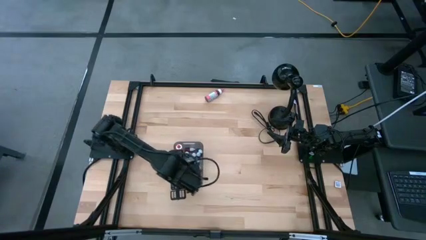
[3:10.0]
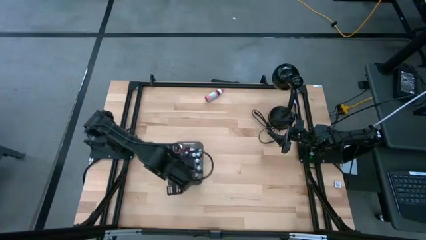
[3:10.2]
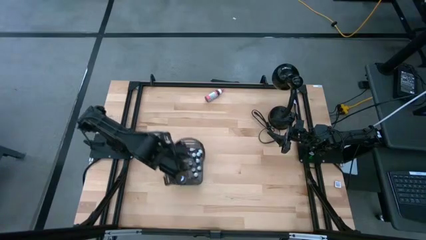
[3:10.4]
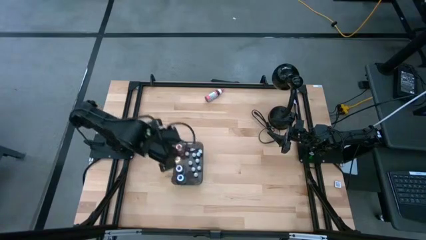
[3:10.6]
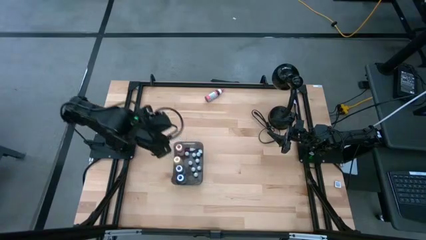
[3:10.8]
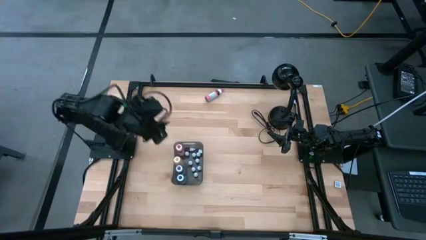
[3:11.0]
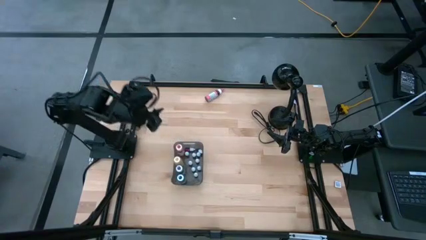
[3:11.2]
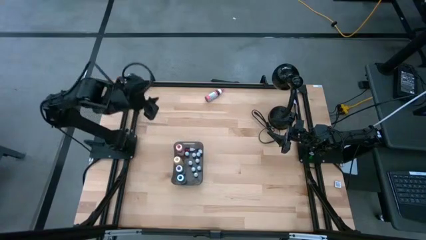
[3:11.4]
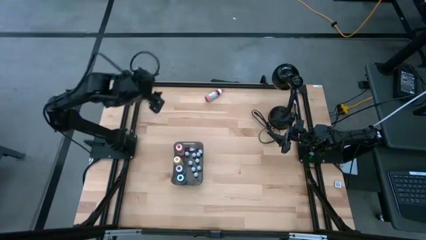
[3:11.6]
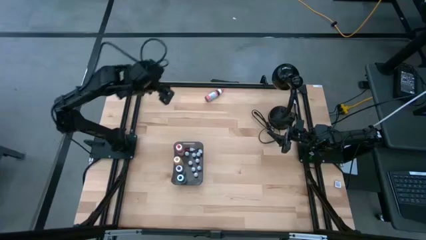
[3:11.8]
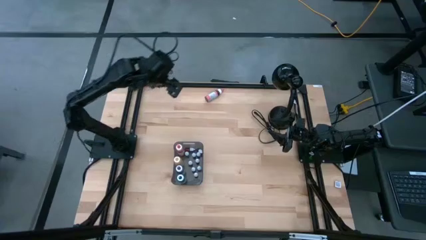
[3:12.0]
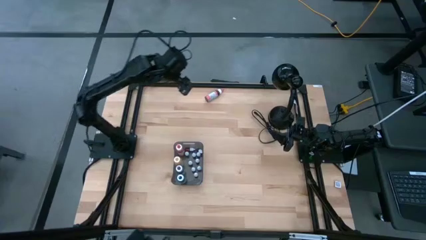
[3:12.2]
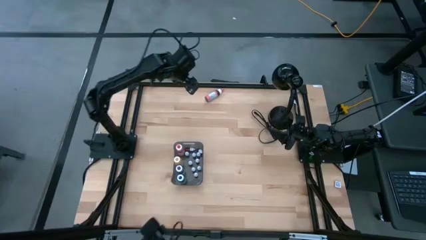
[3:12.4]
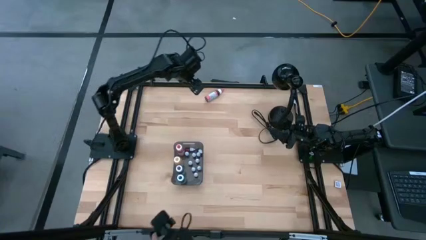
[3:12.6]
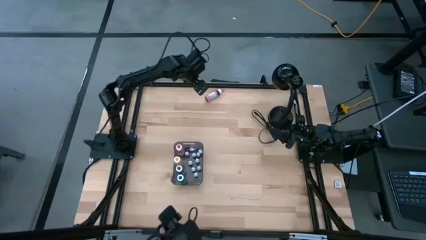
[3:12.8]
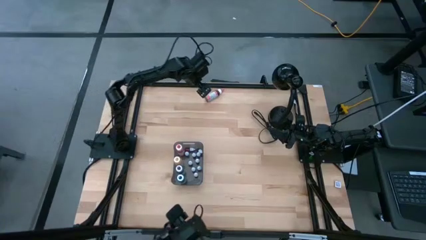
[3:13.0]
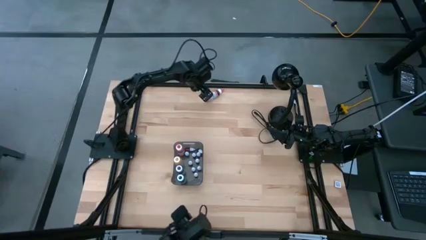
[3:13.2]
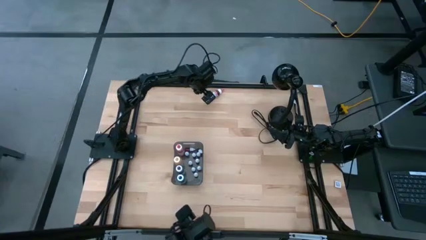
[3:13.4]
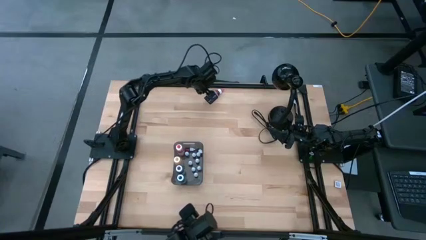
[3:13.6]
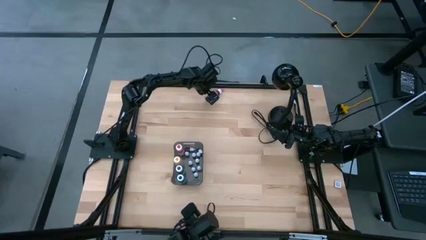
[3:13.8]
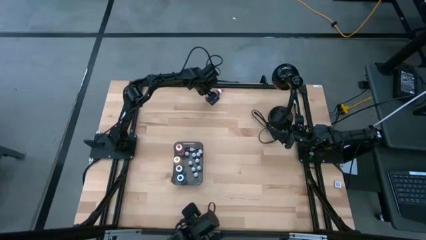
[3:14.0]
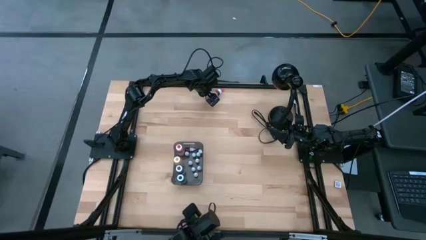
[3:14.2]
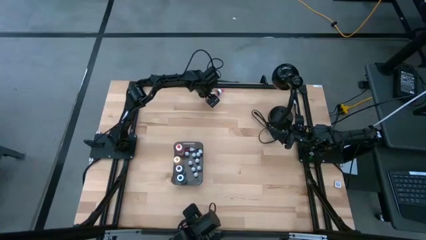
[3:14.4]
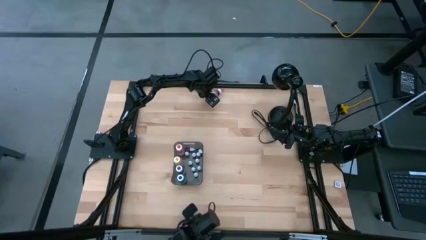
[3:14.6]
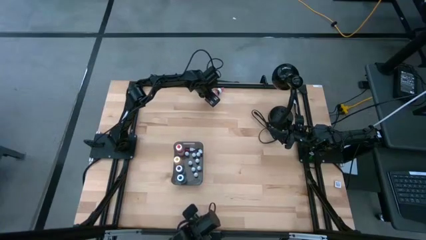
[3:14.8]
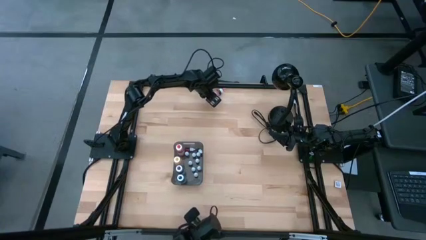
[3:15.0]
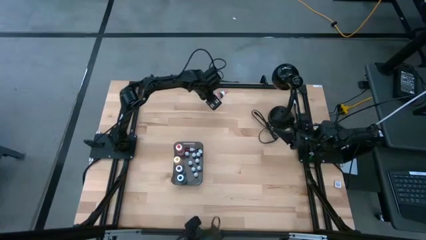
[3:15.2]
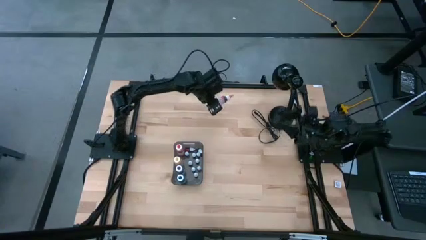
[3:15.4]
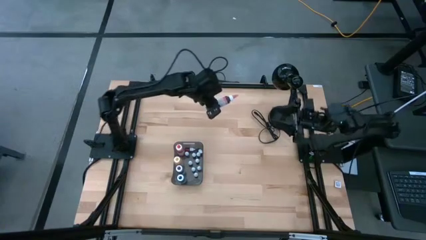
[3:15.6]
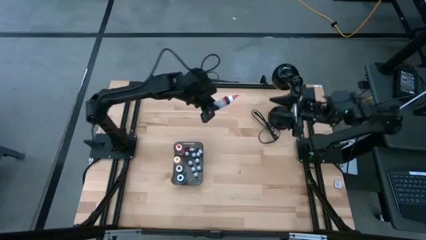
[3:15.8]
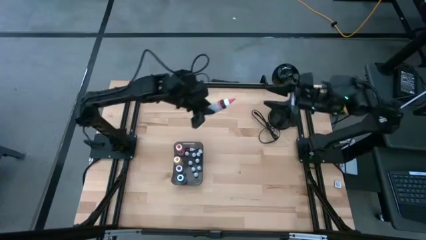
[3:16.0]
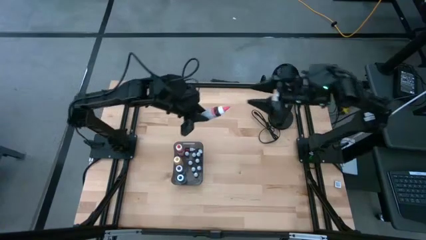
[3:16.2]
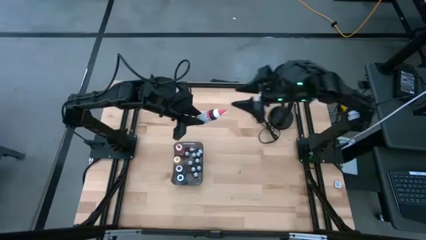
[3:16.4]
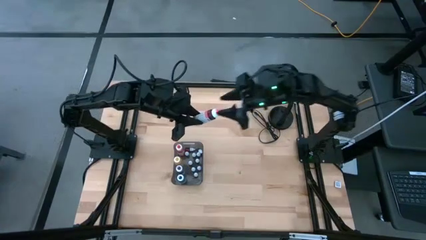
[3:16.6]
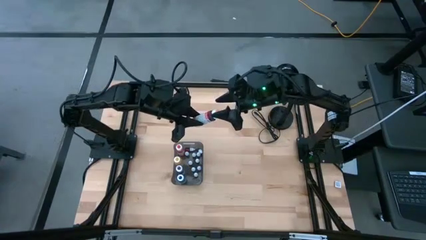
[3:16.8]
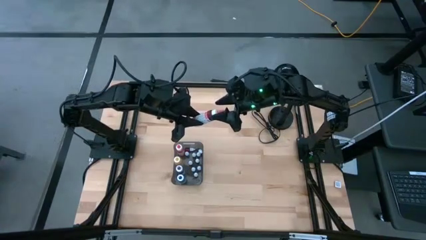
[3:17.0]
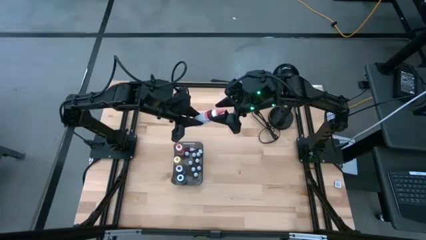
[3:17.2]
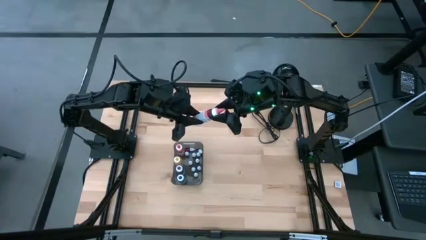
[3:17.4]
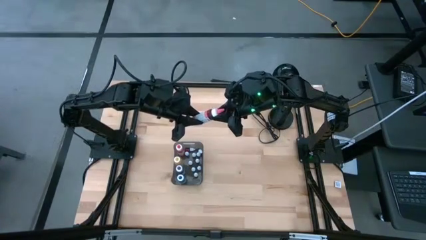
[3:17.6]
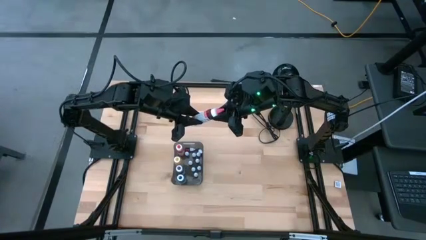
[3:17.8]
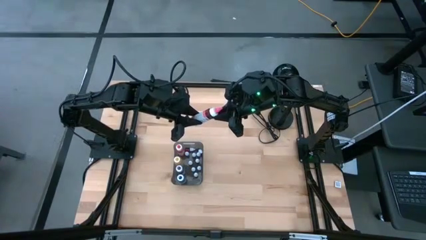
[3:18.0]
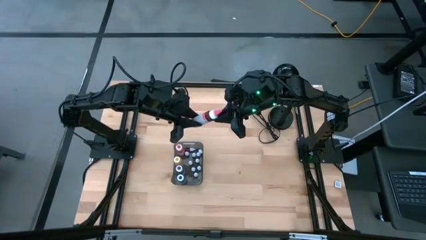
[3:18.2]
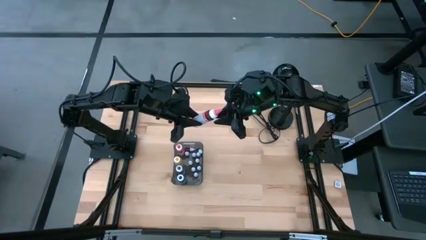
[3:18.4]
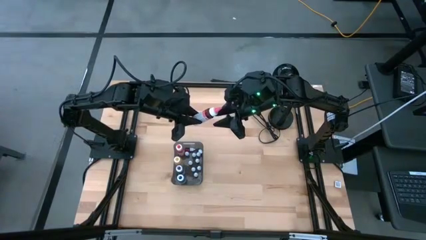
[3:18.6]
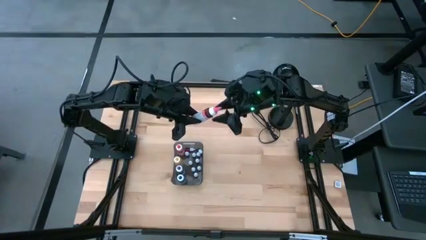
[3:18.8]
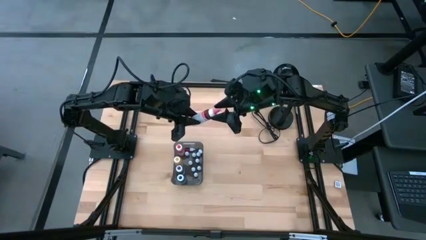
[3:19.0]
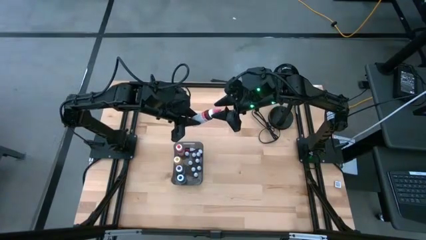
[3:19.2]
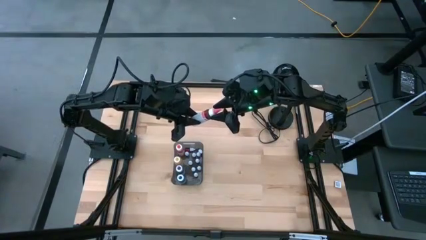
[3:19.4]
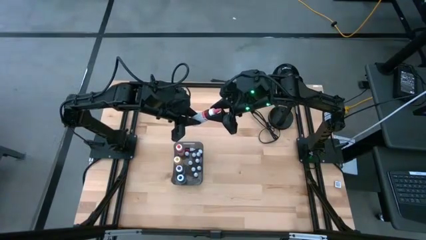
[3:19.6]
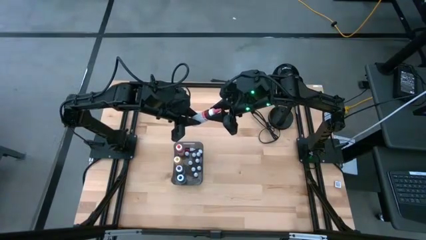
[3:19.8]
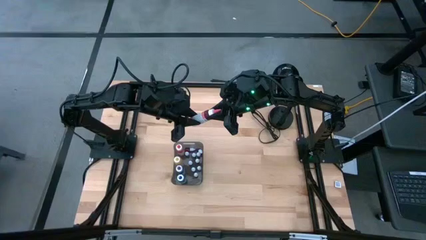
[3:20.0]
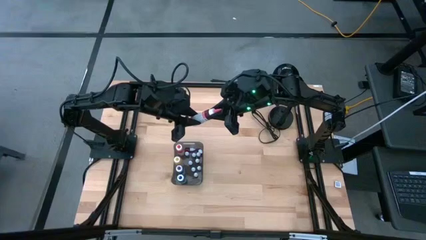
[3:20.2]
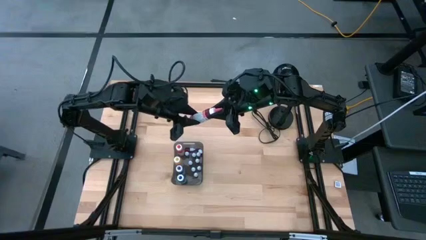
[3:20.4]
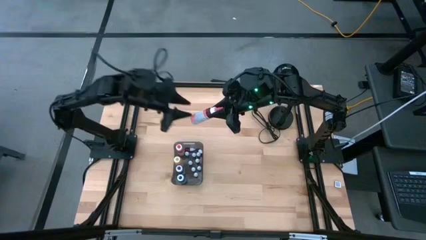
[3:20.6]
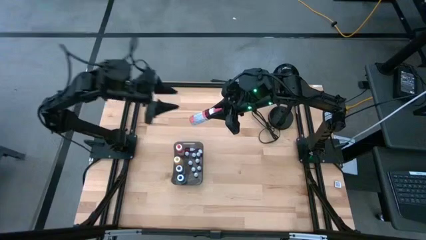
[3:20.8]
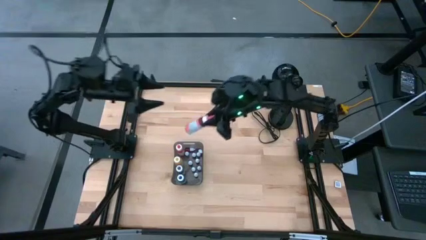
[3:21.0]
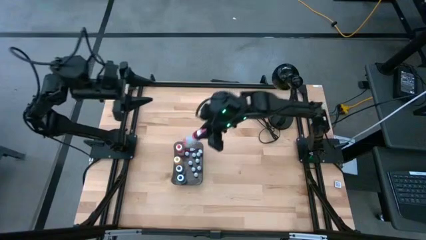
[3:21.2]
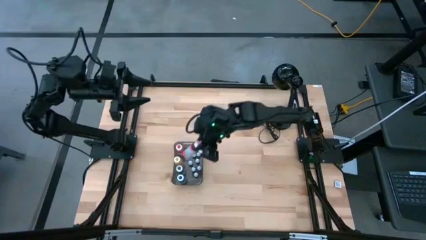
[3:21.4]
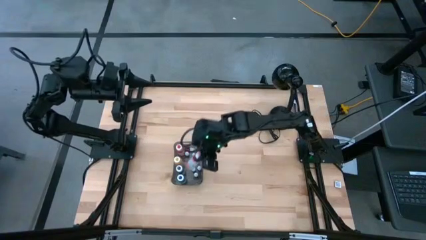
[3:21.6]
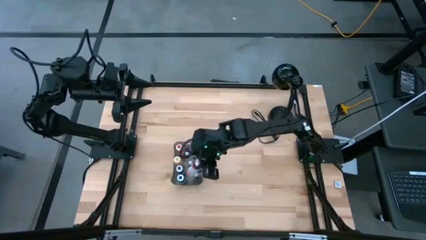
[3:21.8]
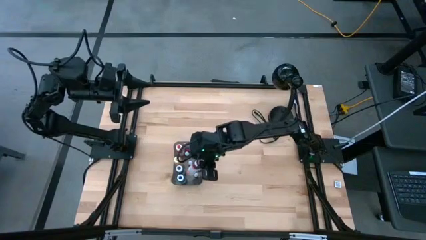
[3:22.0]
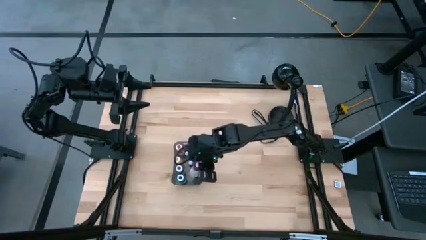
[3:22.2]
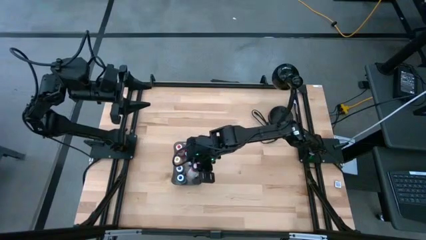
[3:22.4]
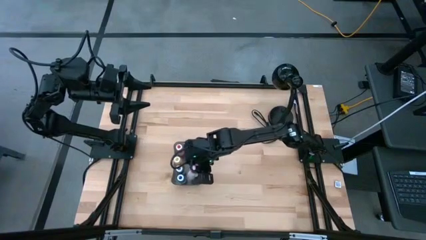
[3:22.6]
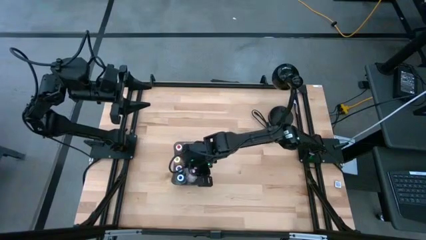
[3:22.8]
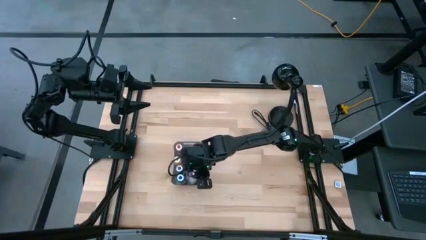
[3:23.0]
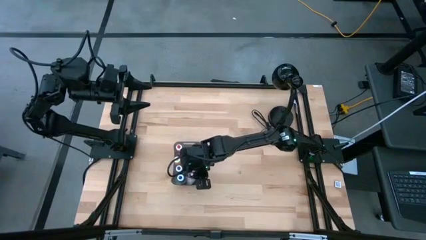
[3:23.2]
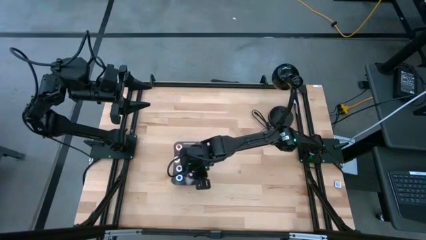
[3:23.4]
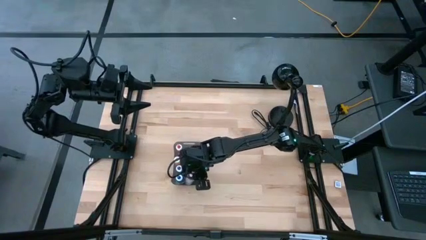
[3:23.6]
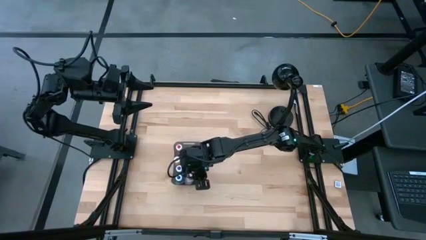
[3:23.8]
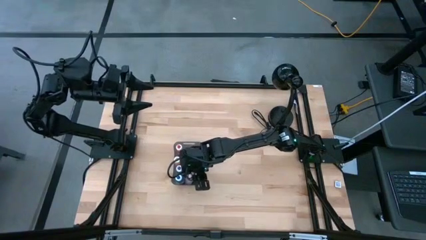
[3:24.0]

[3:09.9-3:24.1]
Task: Pick & Place food coloring
Put the pink food coloring bottle into the bin
